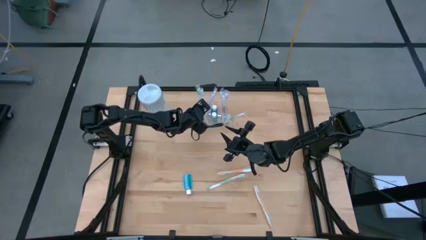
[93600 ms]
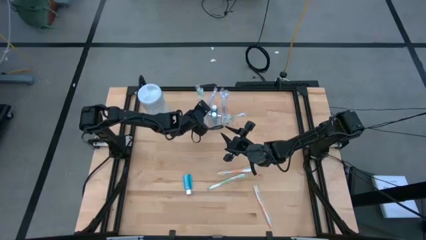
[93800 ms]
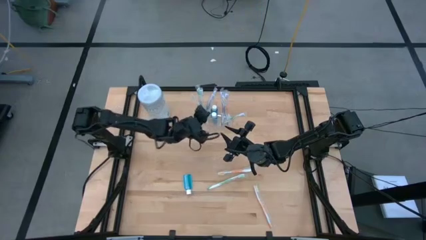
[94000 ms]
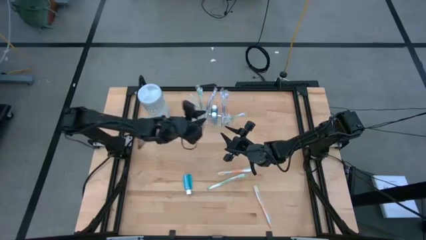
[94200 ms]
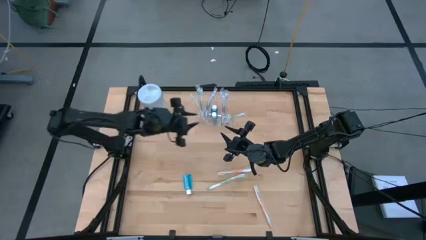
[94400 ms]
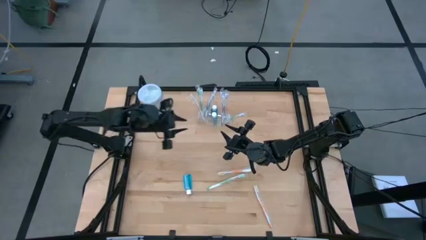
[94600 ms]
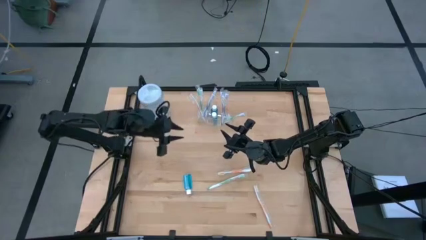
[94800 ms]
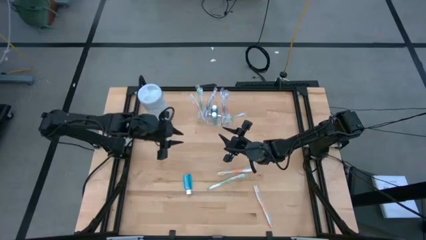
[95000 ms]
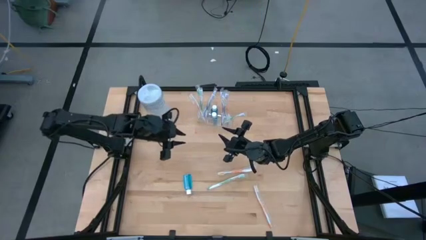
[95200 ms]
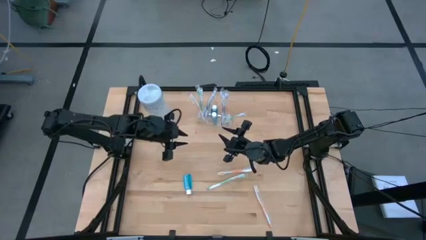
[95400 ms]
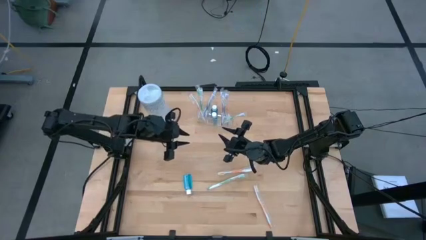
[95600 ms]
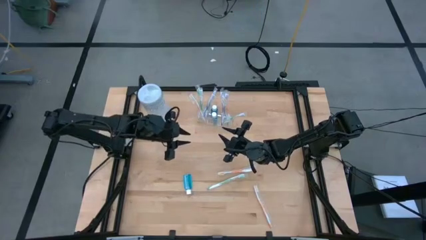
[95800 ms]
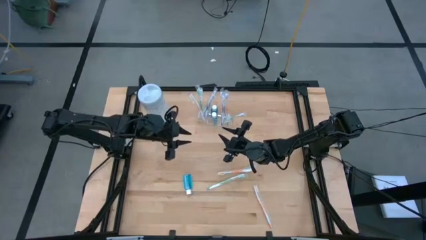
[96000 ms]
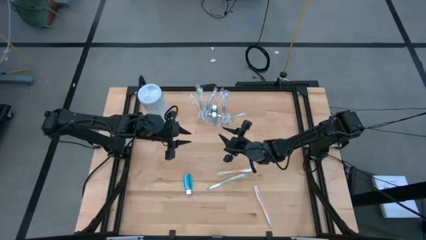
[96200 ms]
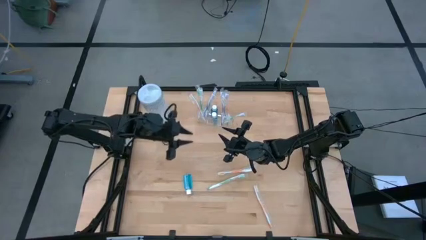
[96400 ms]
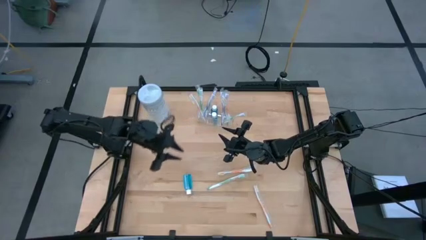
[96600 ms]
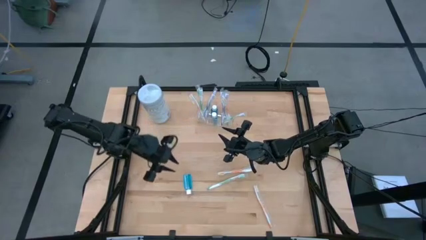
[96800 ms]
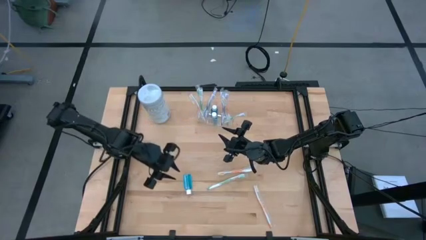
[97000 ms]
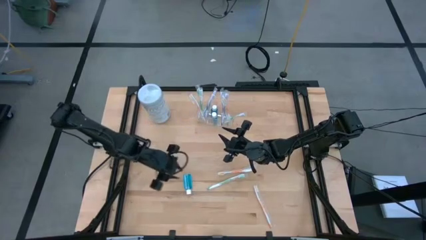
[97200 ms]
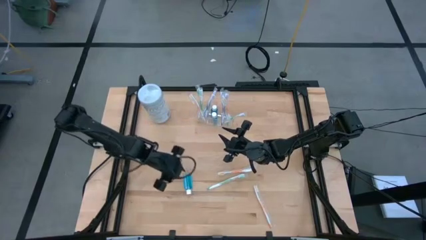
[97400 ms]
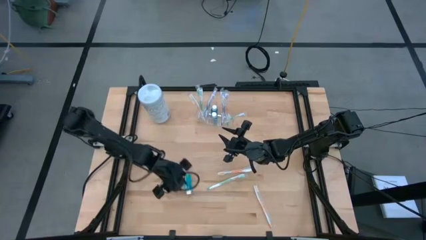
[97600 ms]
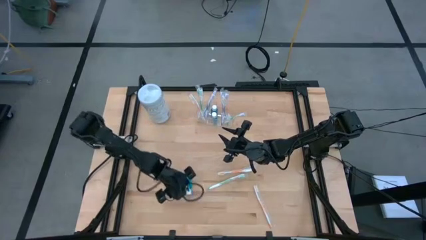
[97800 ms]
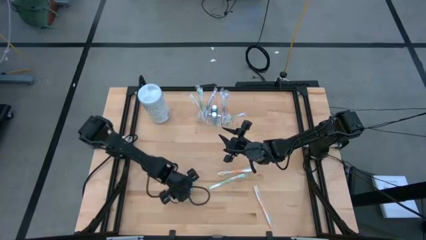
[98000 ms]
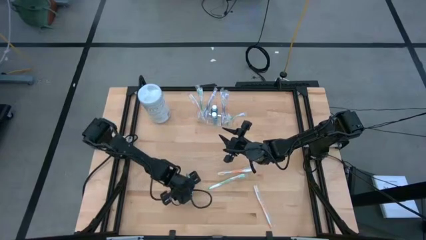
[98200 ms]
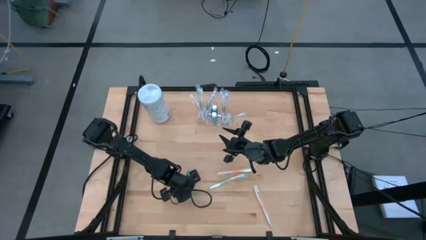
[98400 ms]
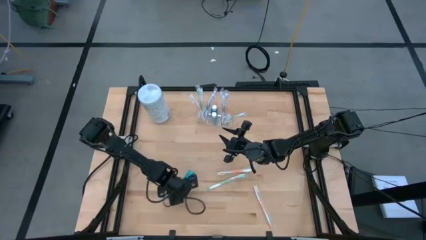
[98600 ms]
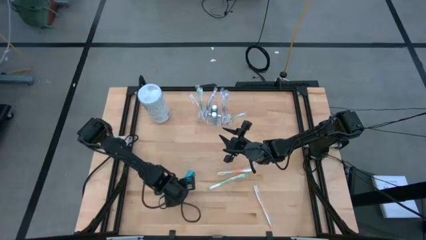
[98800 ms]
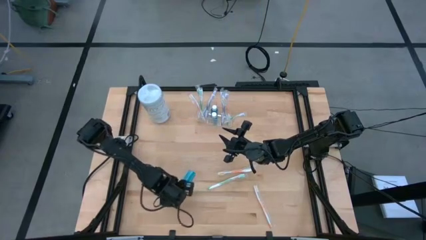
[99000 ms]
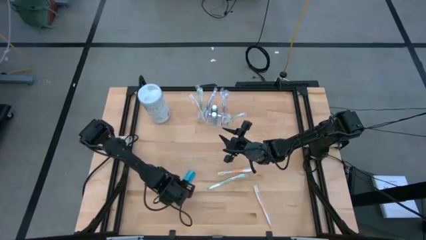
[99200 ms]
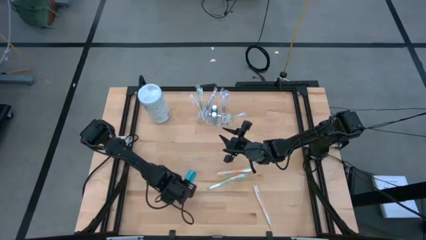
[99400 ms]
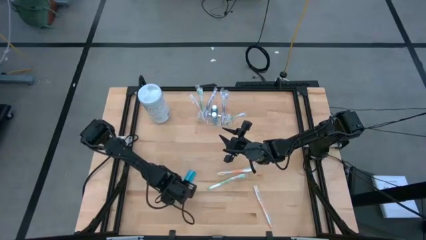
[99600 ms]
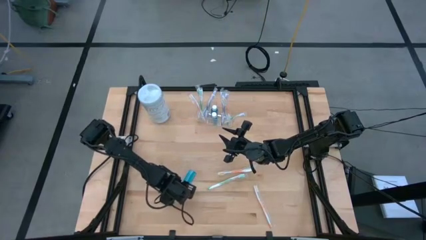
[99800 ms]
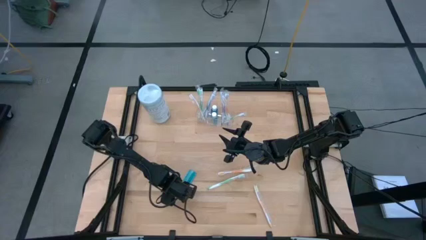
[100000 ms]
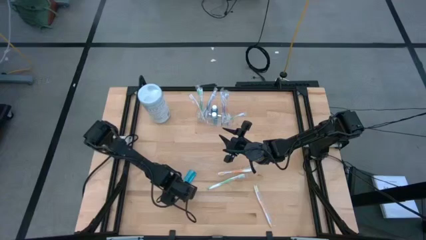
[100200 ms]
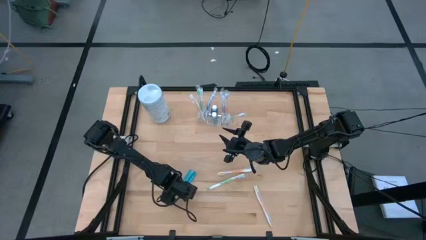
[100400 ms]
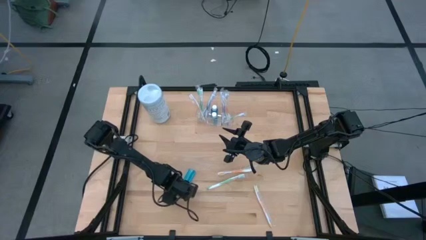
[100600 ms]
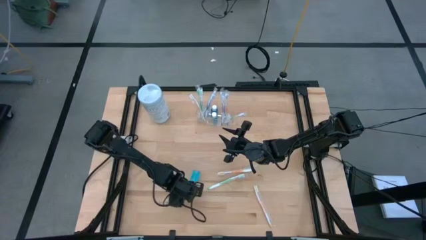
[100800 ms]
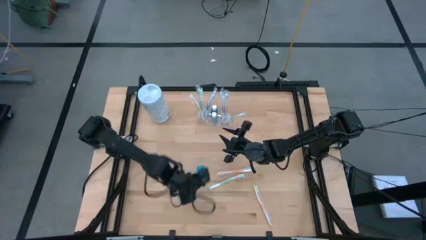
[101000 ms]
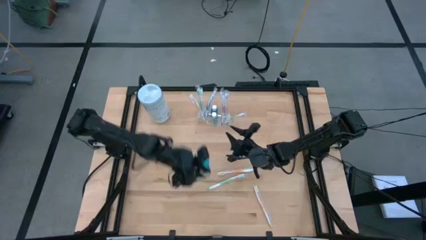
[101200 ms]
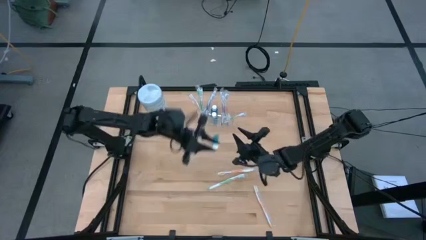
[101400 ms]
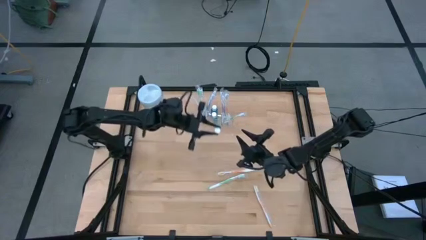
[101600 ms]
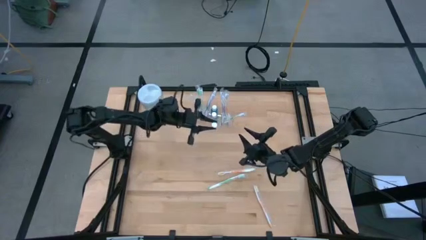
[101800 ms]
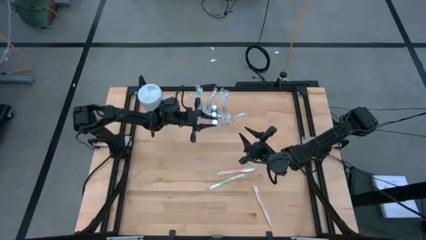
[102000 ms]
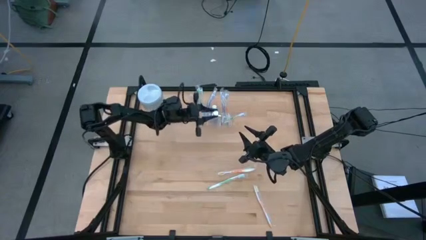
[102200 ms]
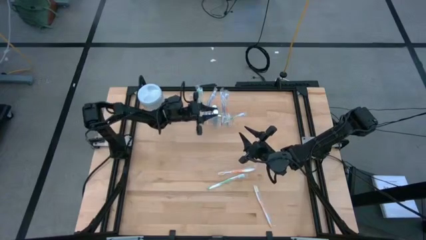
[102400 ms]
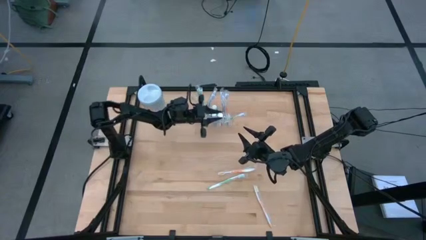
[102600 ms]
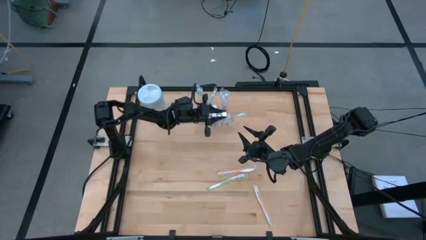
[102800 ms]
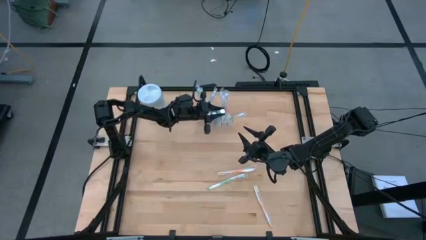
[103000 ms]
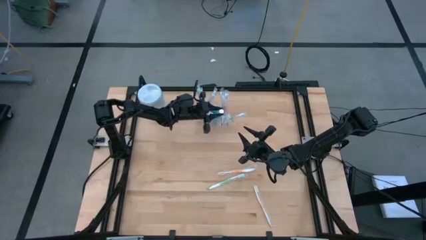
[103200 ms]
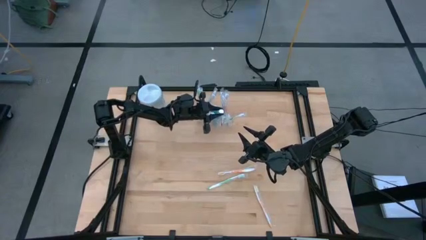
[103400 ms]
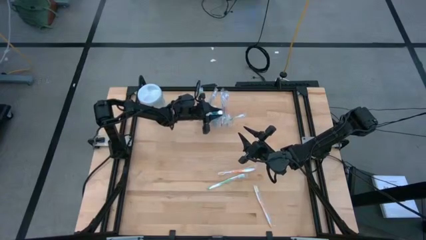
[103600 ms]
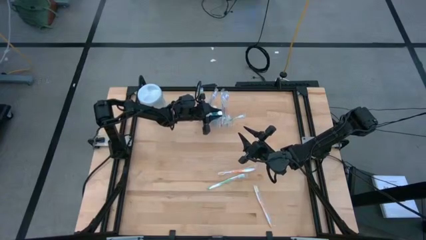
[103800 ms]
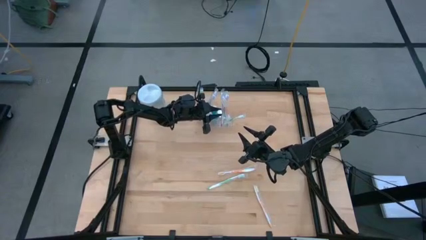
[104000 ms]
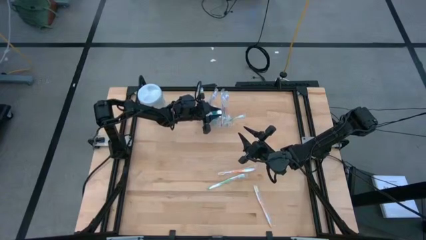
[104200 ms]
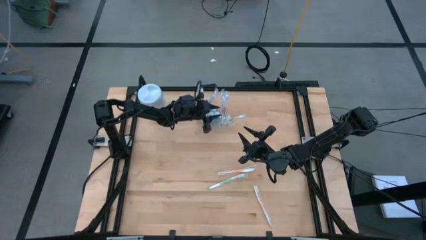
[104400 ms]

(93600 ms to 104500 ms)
Task: Pick & Place toothbrushing station
Put the mouthwash into the transparent organizer

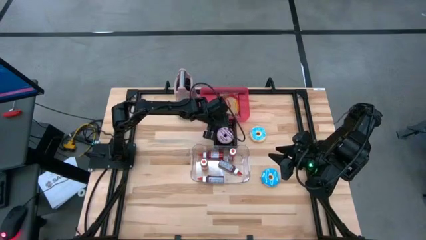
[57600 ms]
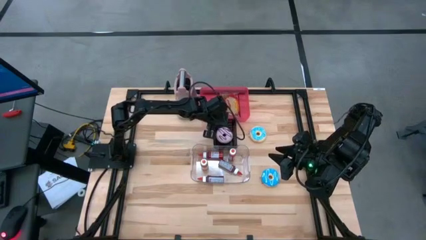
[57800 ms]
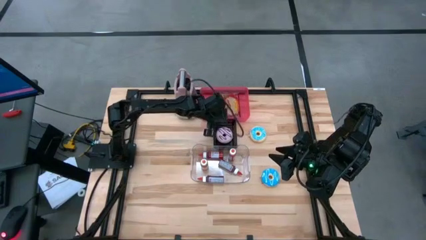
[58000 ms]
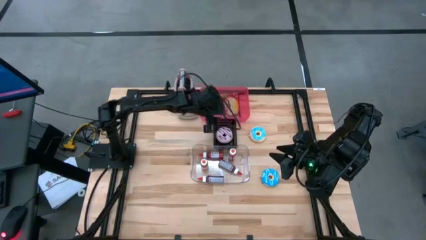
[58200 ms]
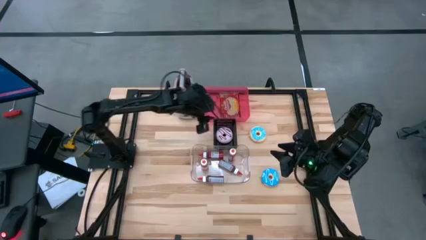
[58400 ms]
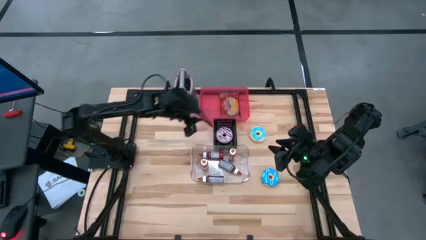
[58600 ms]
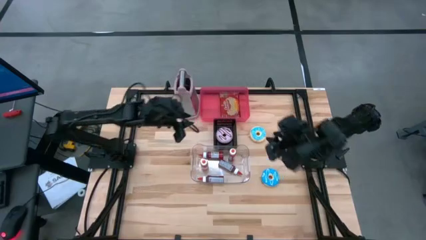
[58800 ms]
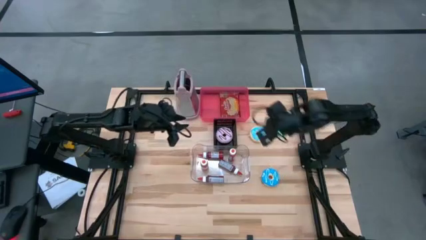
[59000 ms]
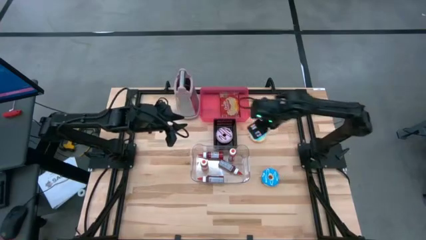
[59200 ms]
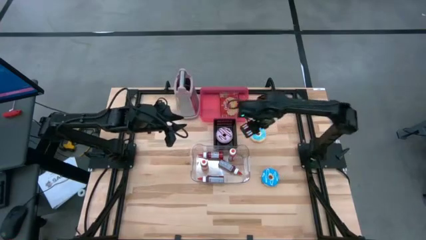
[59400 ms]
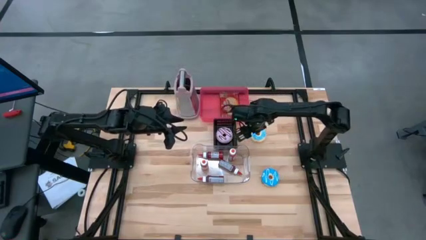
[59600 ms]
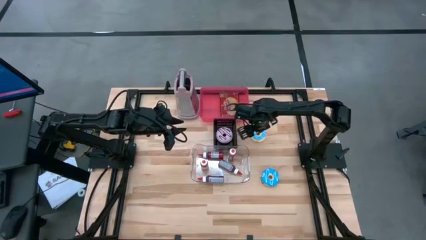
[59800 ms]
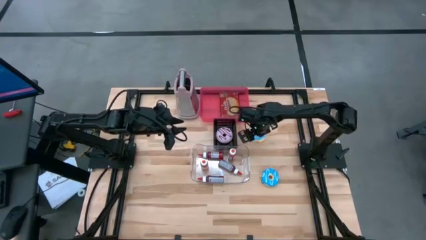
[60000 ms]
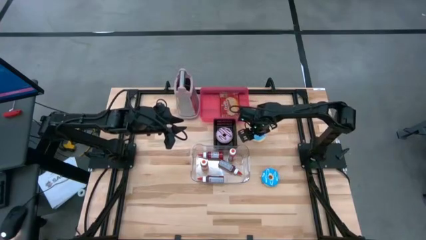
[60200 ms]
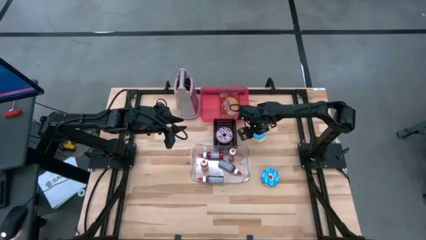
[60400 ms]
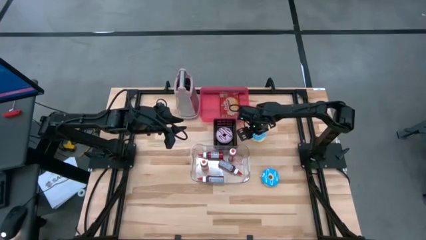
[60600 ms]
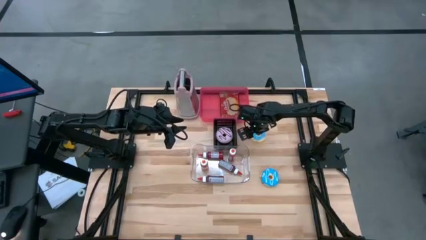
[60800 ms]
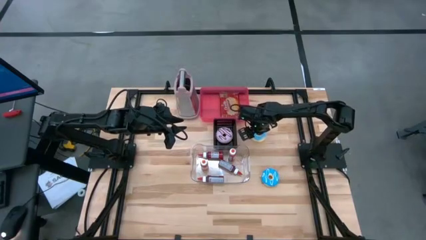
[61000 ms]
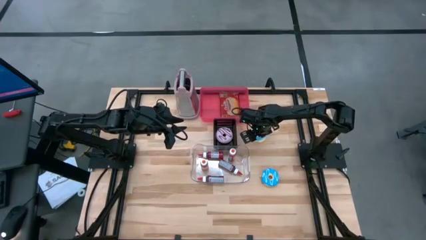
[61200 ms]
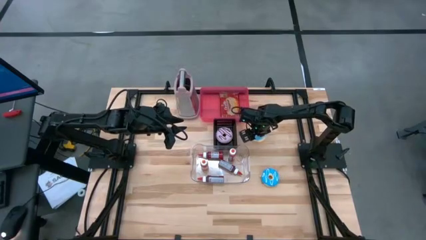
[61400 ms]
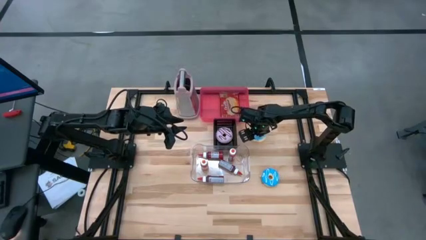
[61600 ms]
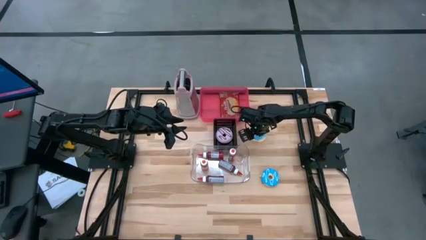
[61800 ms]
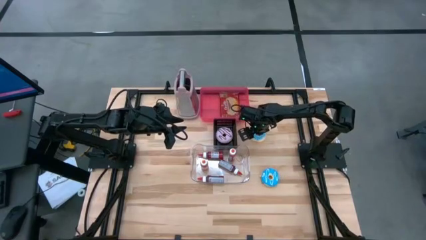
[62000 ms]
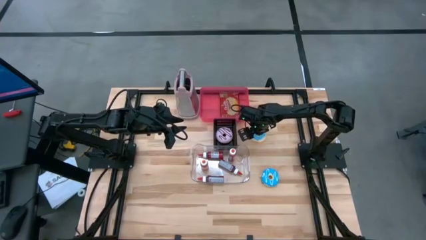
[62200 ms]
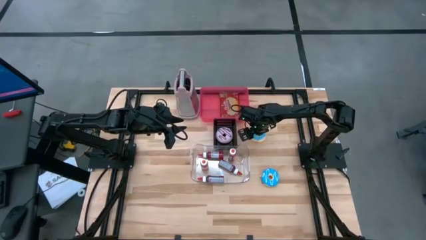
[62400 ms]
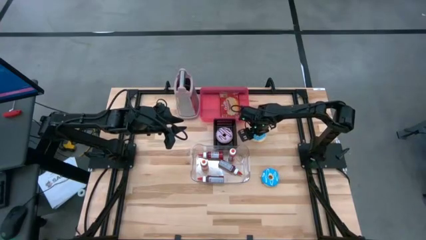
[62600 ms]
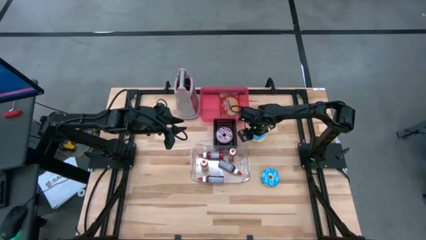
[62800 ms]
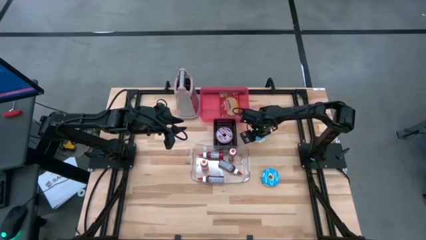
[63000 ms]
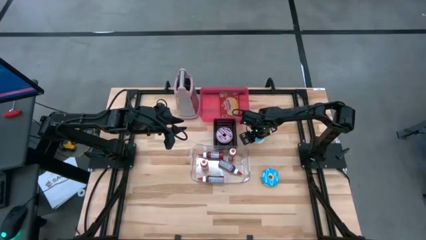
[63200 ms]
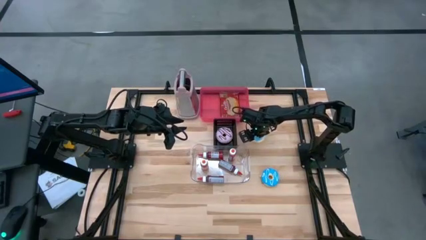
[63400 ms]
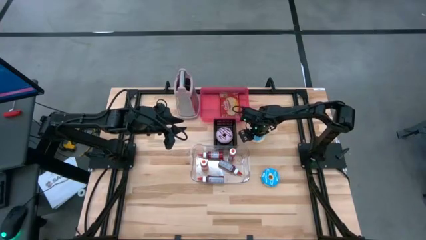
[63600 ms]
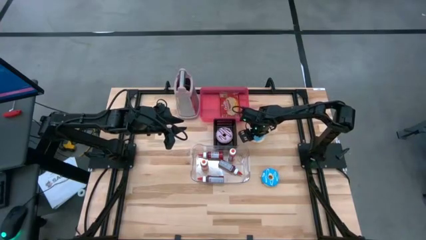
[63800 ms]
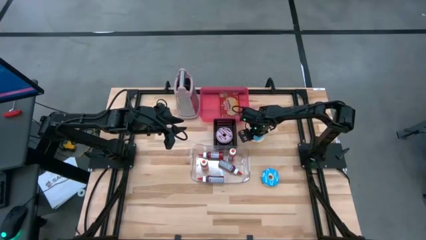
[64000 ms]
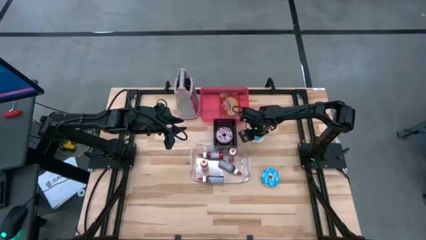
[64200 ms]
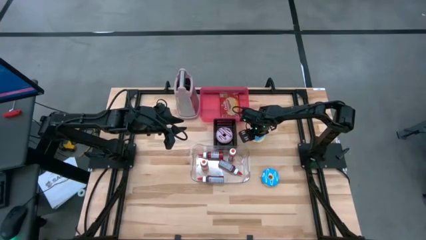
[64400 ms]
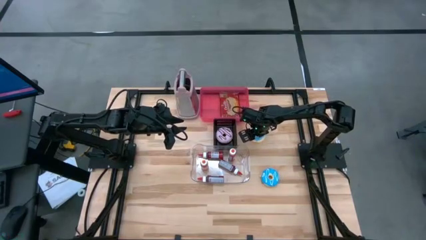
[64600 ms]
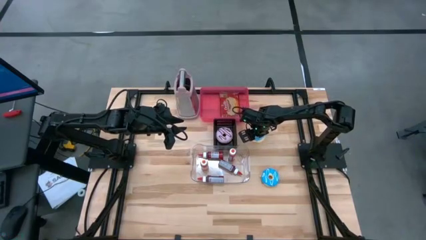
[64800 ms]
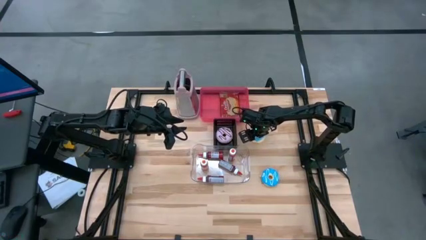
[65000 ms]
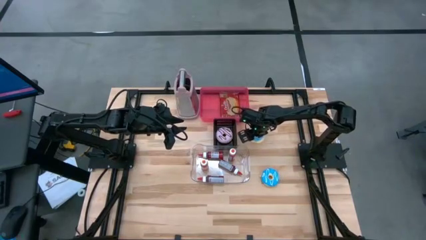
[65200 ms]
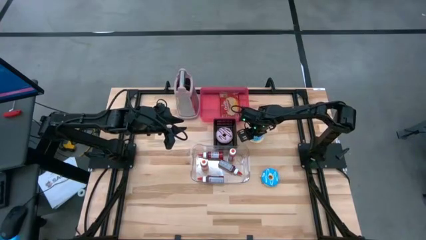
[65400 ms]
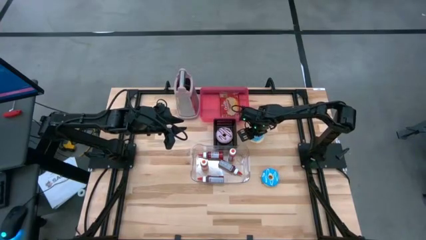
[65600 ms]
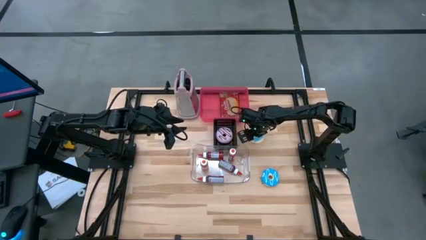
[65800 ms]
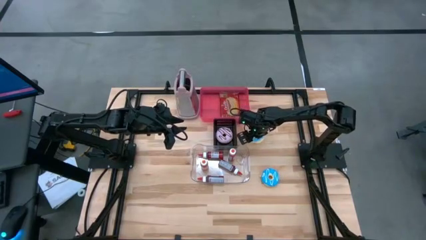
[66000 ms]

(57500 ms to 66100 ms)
Task: Pick & Place Food Item
Put the light blue donut into the black bin
